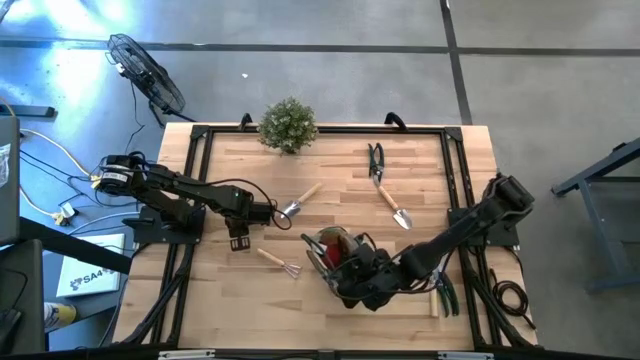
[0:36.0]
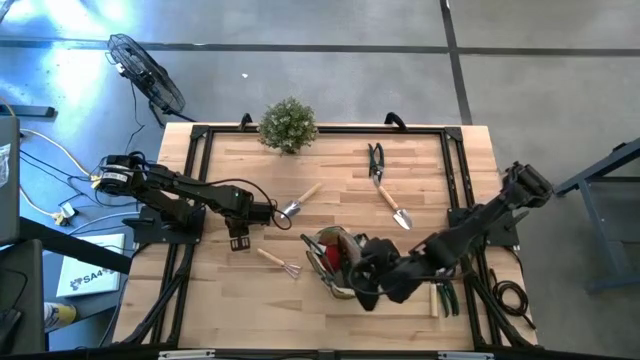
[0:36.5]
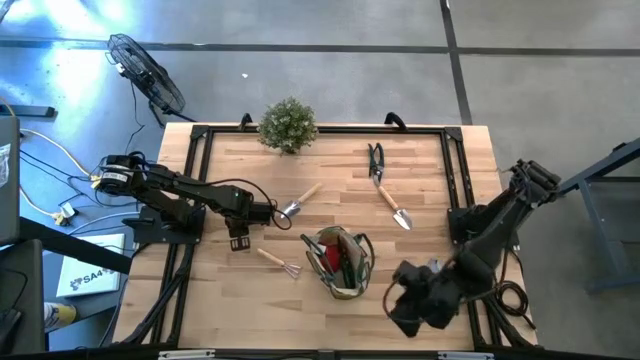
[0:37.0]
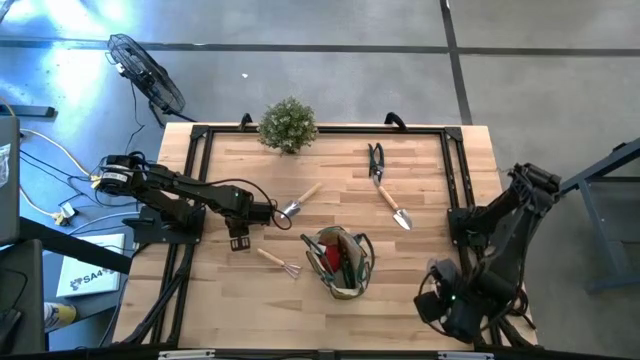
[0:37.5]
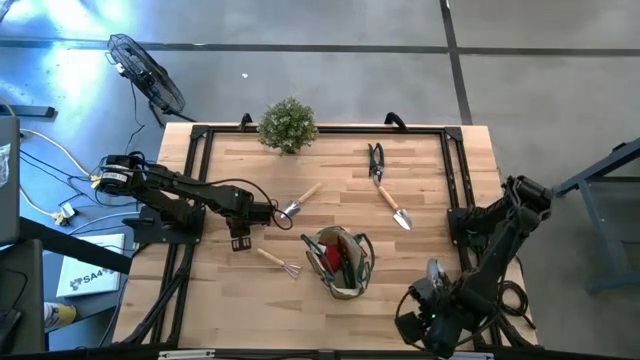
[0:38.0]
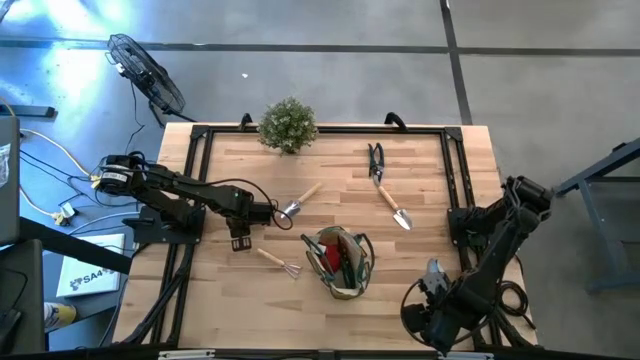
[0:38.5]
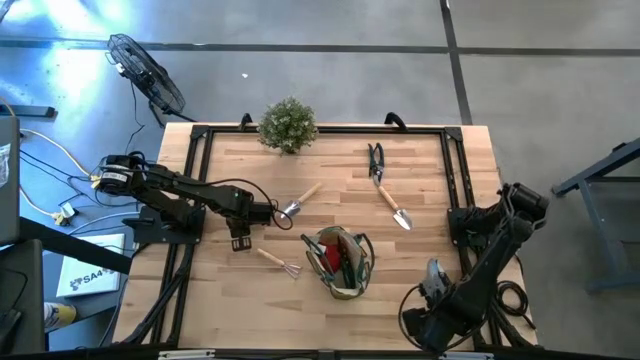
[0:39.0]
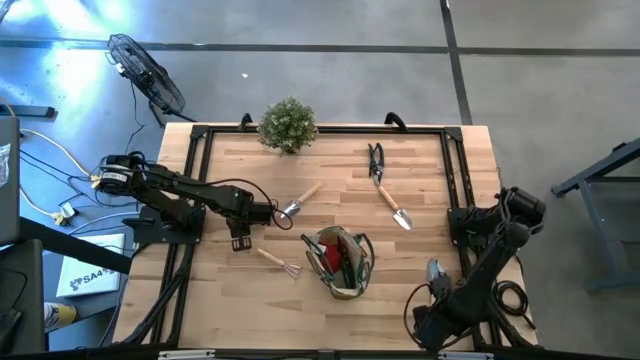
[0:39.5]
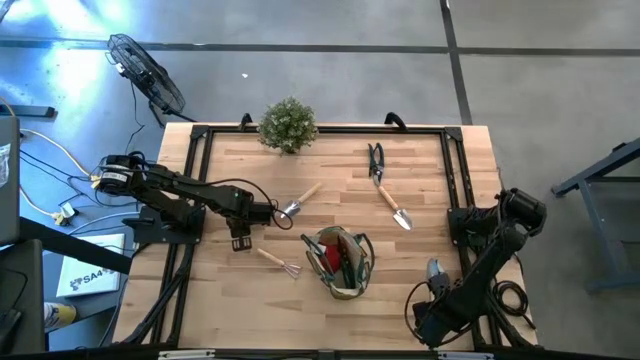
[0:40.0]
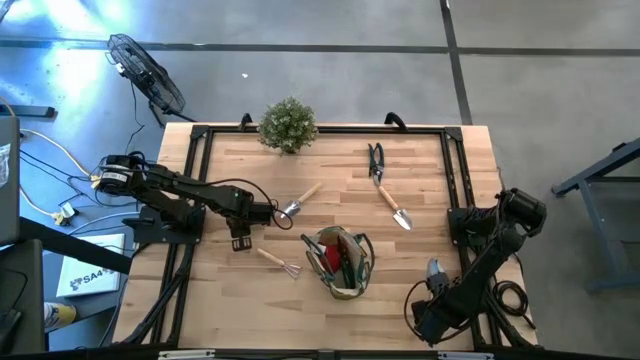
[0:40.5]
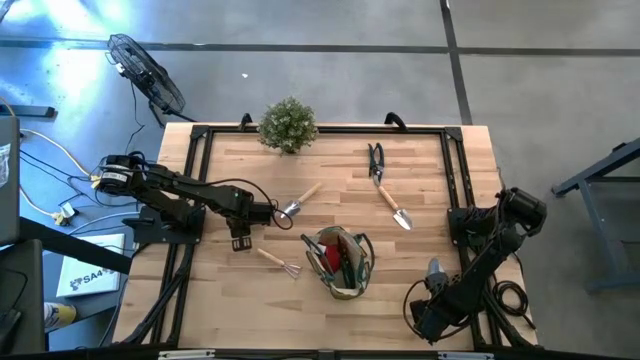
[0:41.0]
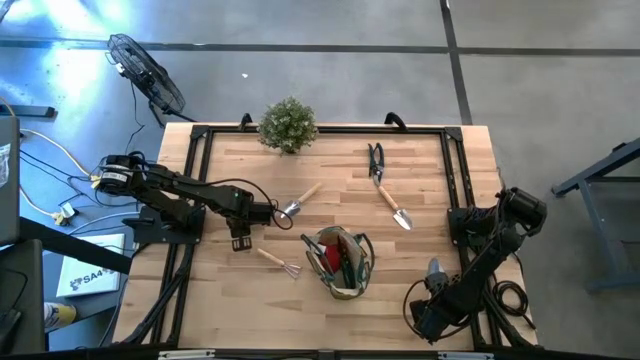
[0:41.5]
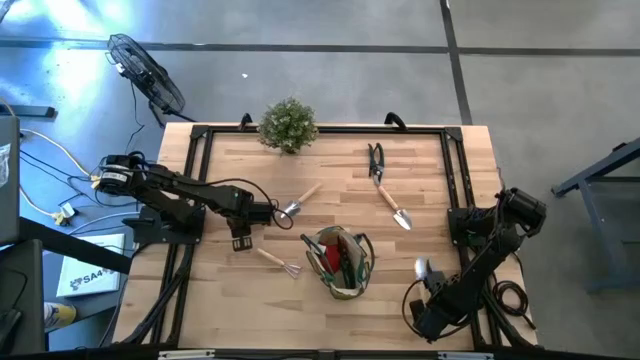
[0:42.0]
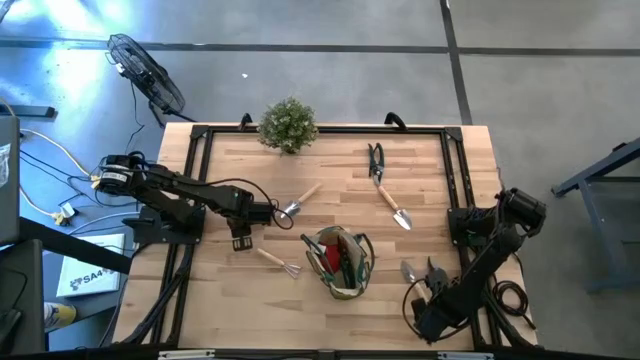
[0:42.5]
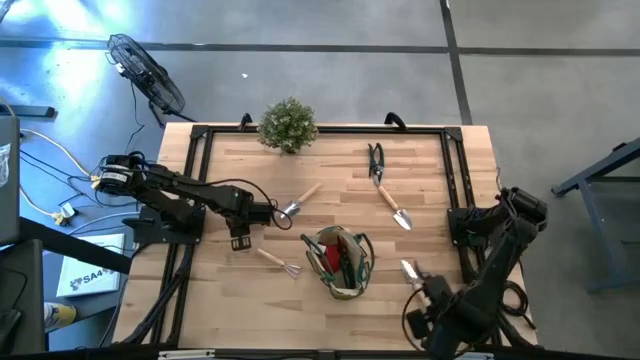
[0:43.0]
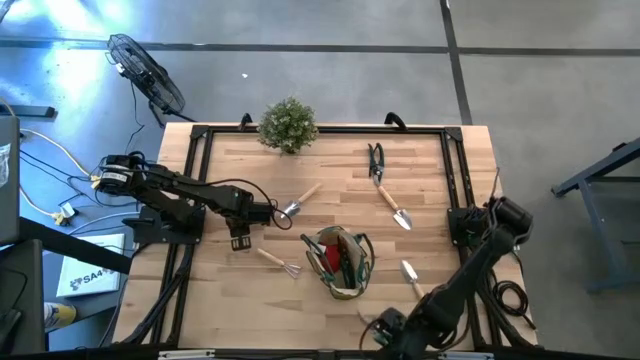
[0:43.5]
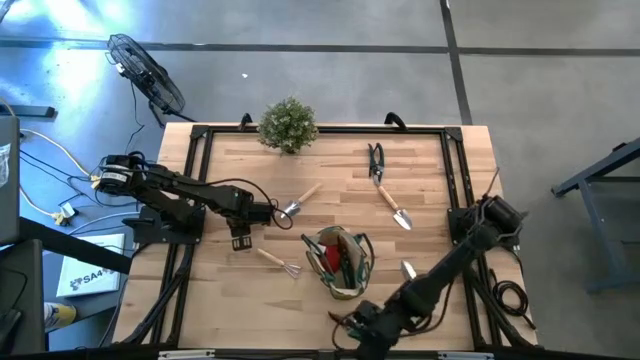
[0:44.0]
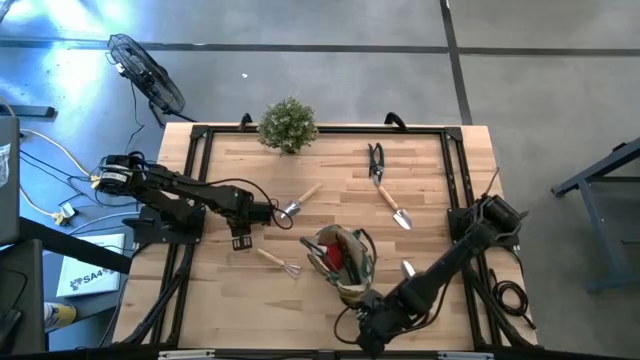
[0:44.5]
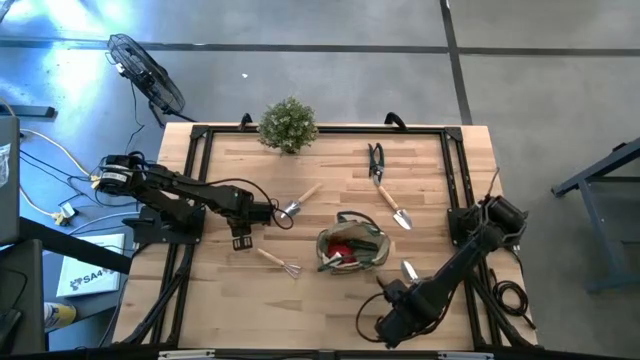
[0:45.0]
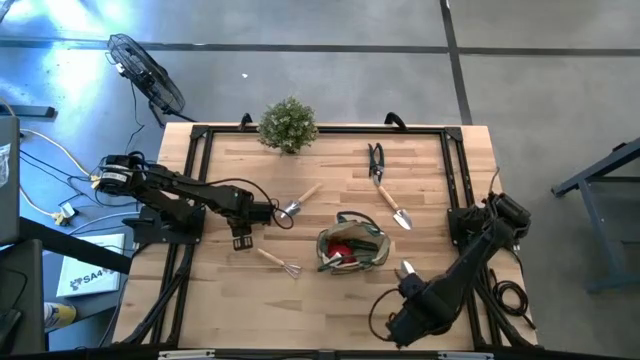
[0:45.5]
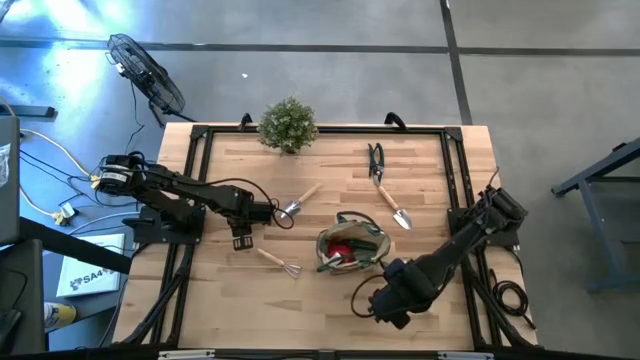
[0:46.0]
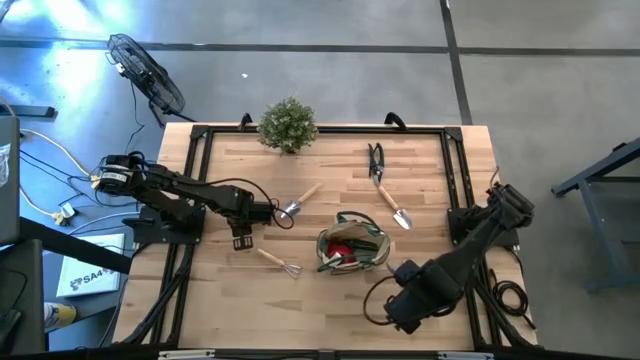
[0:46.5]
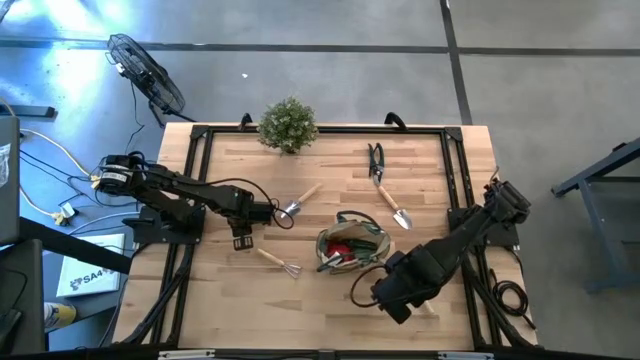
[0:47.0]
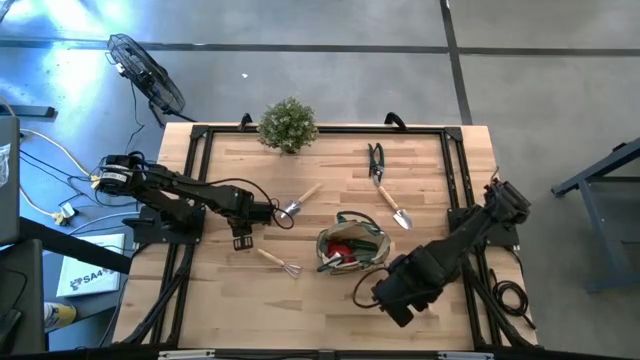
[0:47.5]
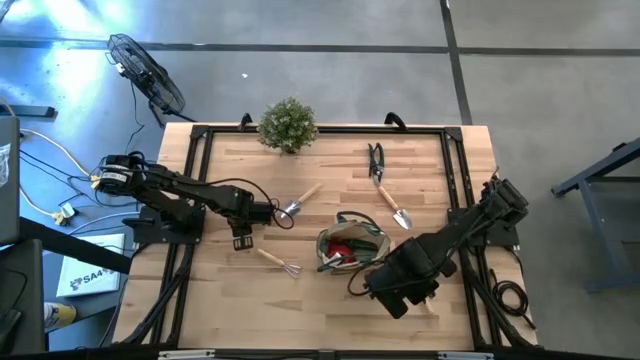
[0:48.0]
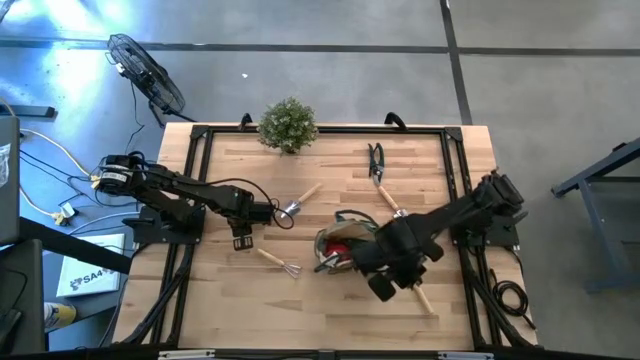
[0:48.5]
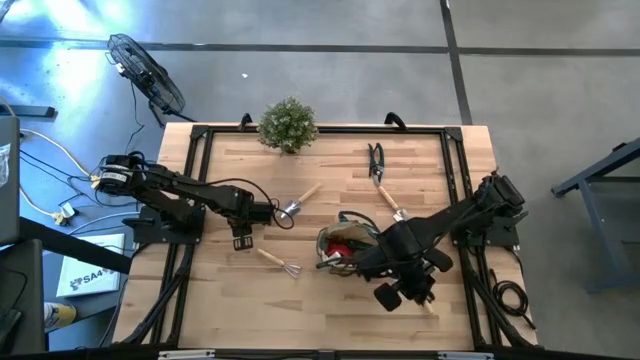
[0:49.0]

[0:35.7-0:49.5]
Task: Pick & Place Garden tools in Gardening bag
Put the bottom green scissors into the green bag

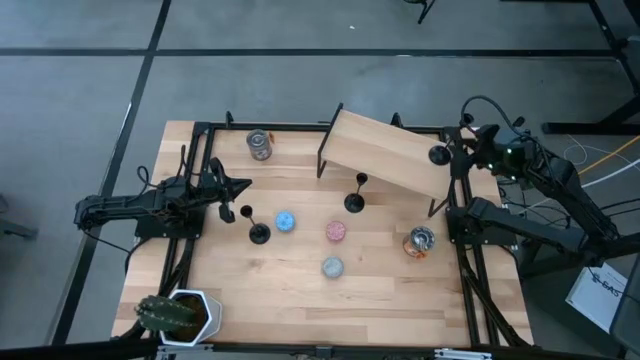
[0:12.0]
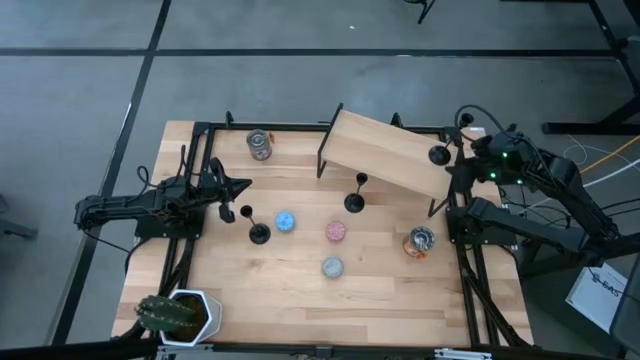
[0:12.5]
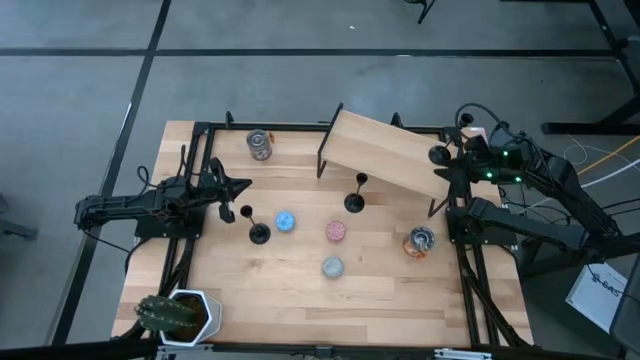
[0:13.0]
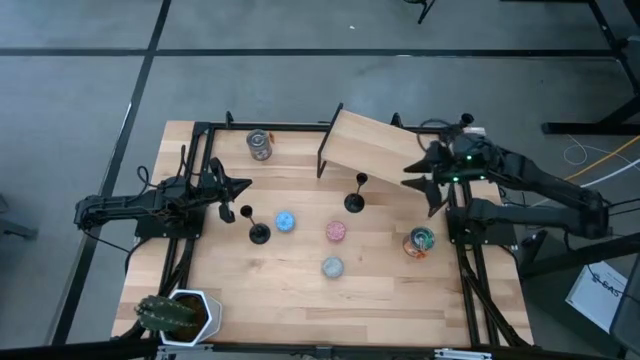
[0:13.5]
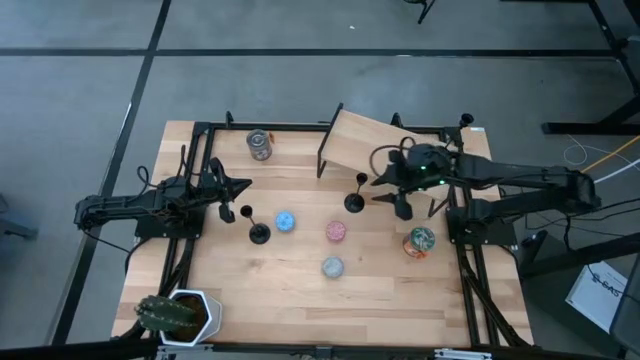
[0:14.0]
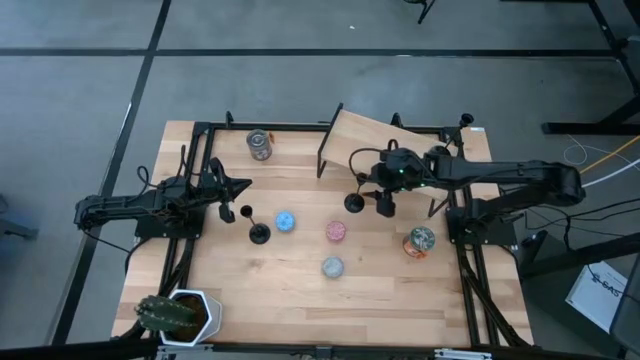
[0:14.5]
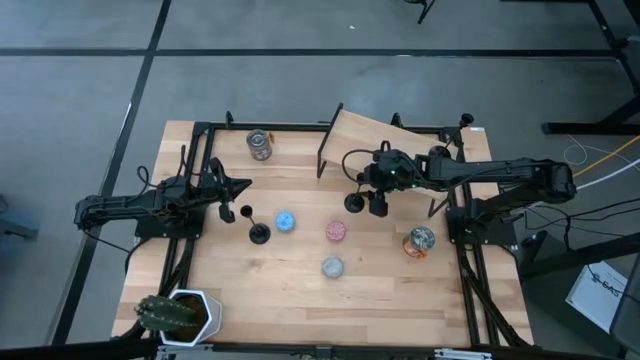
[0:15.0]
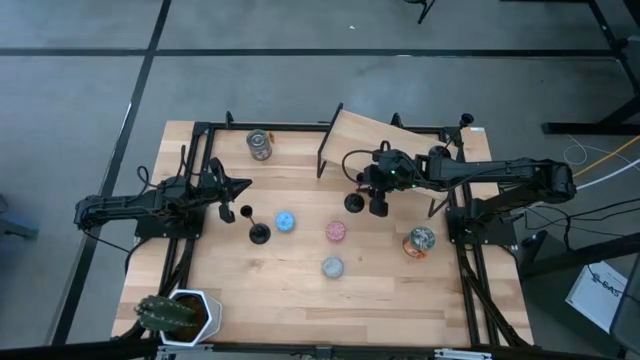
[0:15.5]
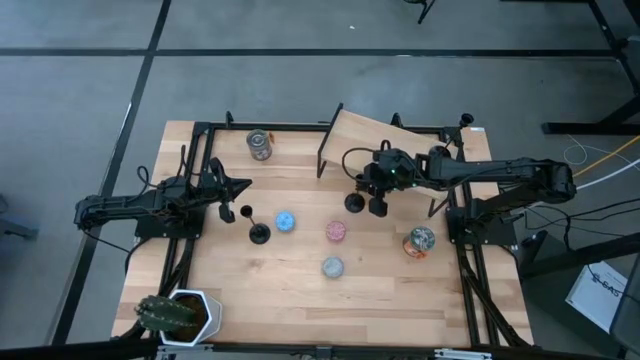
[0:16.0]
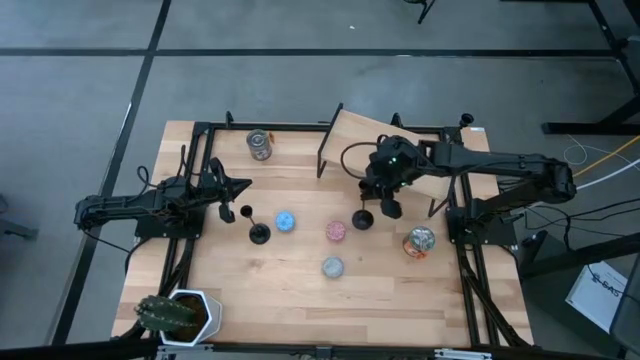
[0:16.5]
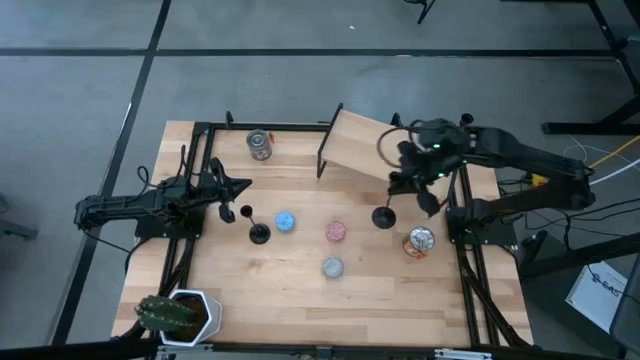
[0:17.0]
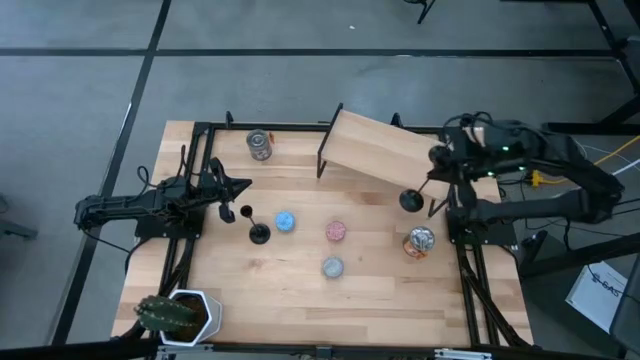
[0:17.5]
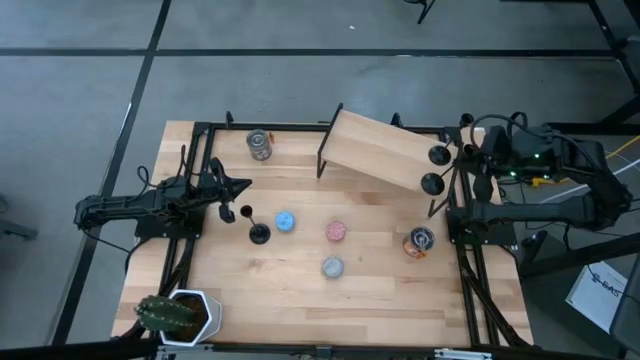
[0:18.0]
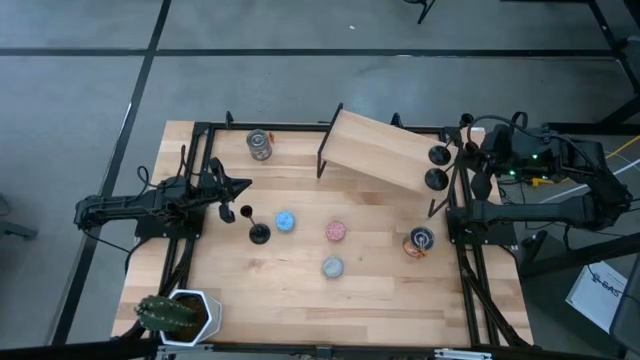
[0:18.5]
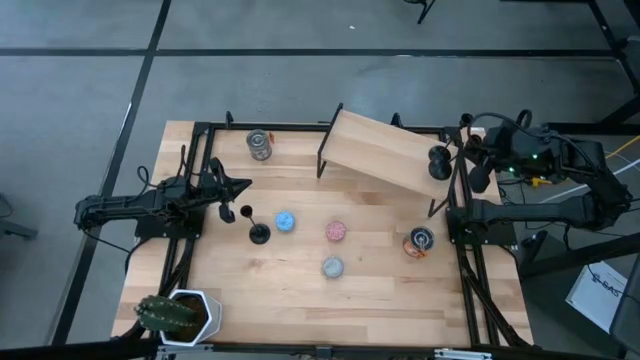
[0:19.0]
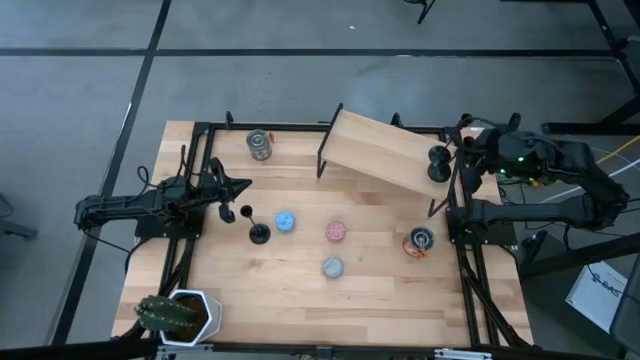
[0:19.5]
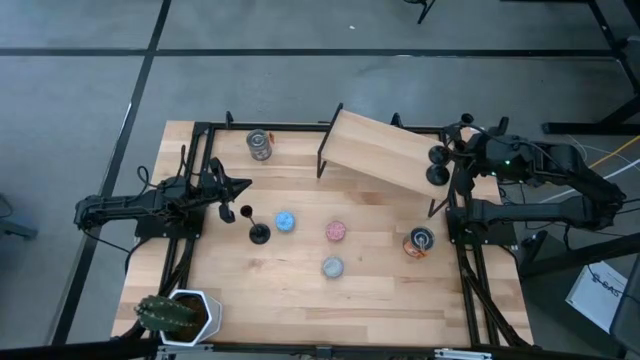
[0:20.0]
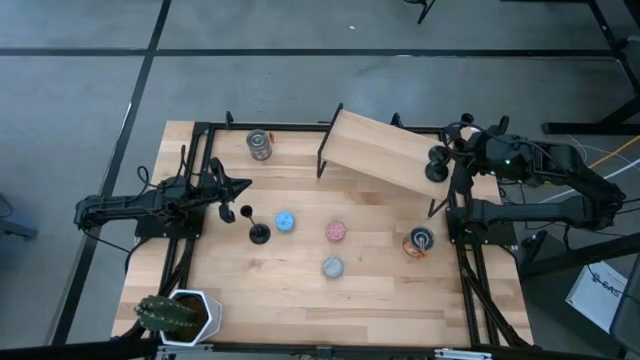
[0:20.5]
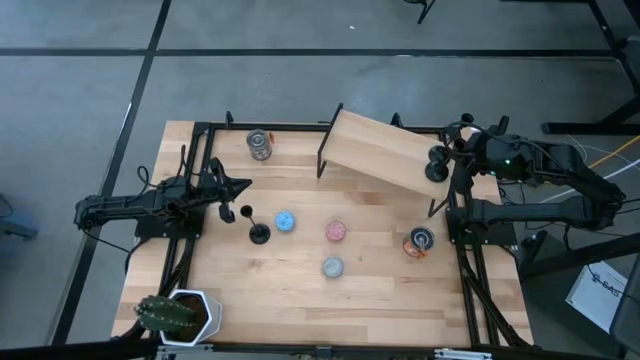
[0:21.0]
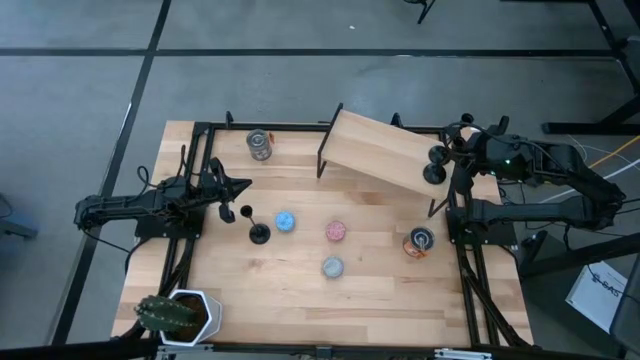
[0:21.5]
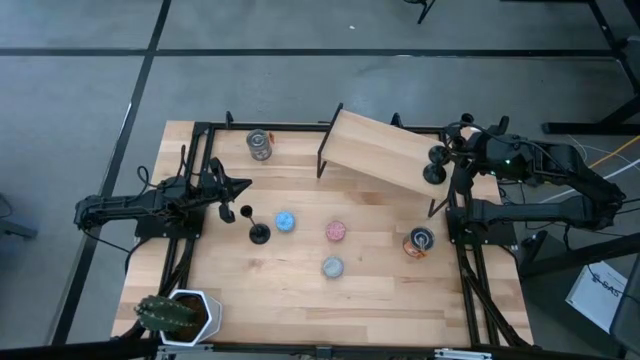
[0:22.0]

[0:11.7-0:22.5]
Task: Pick & Place candle stick holders
Align the top black candle holder with the other black candle holder on the shelf
